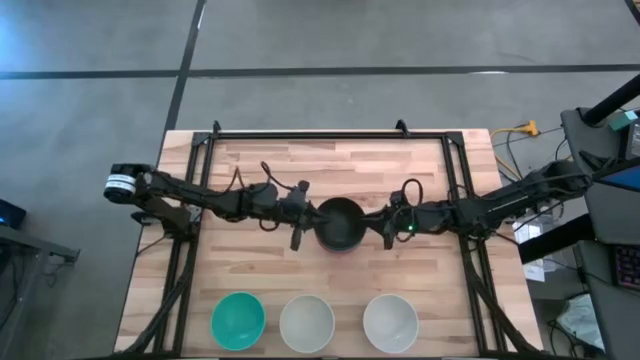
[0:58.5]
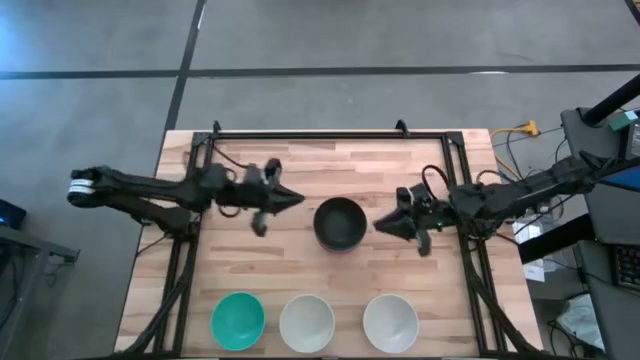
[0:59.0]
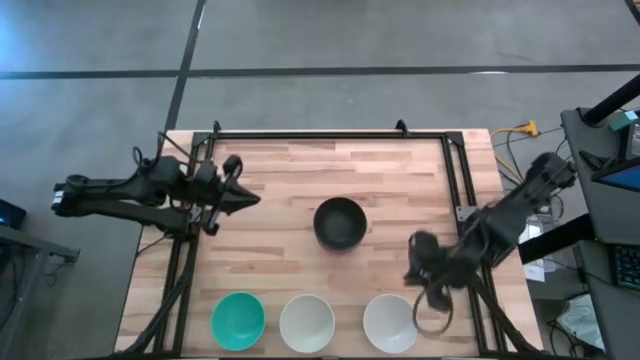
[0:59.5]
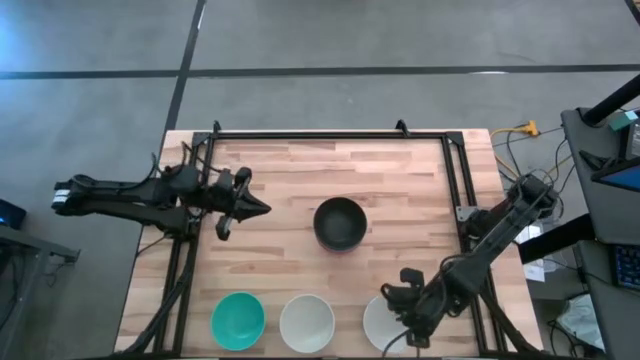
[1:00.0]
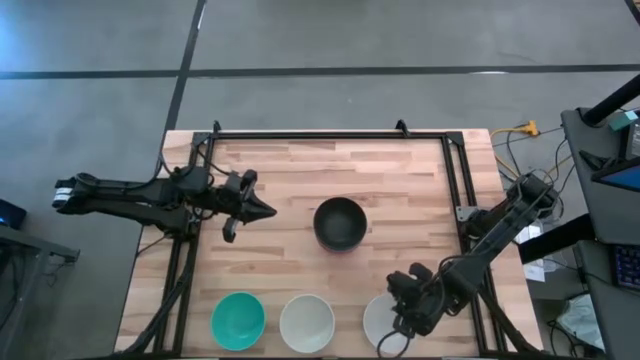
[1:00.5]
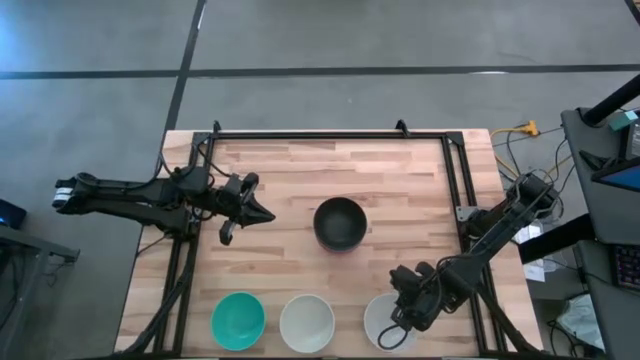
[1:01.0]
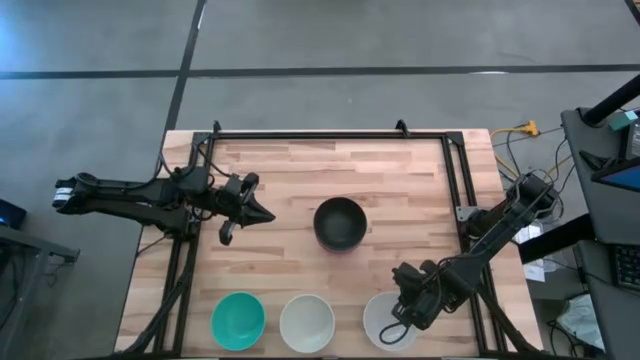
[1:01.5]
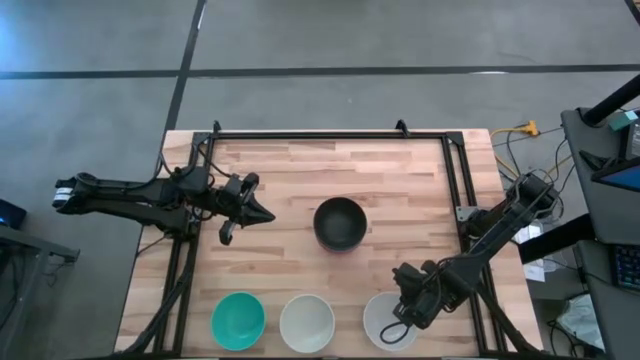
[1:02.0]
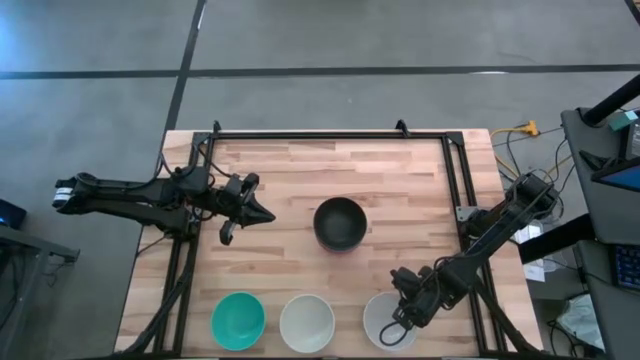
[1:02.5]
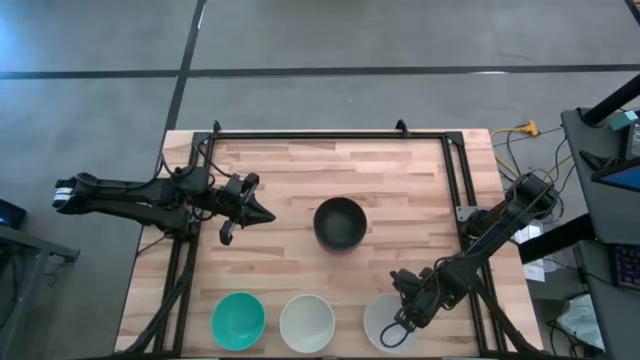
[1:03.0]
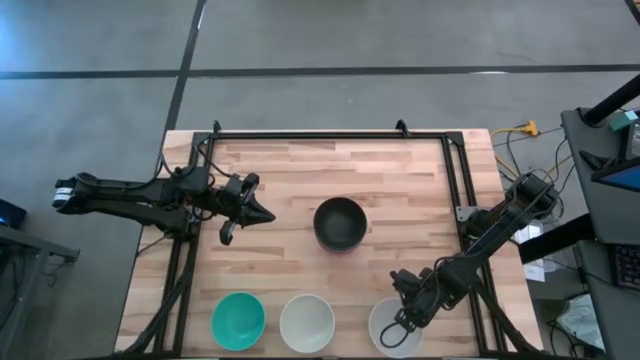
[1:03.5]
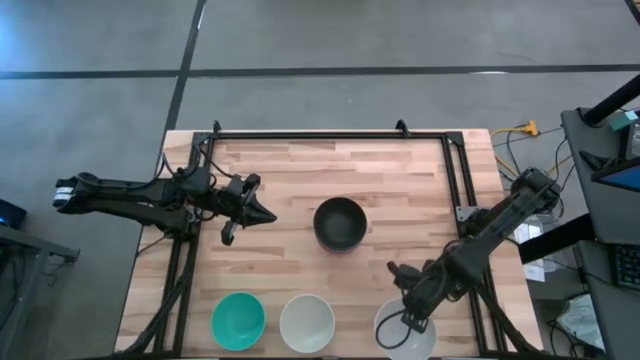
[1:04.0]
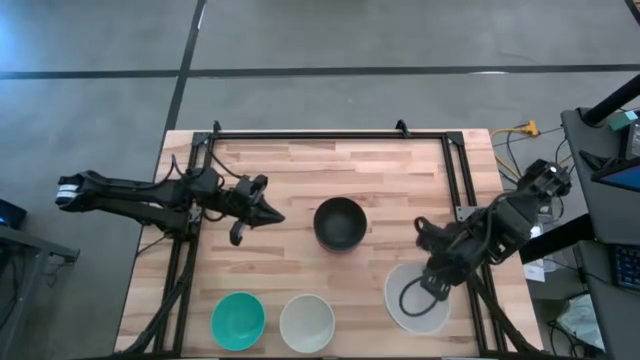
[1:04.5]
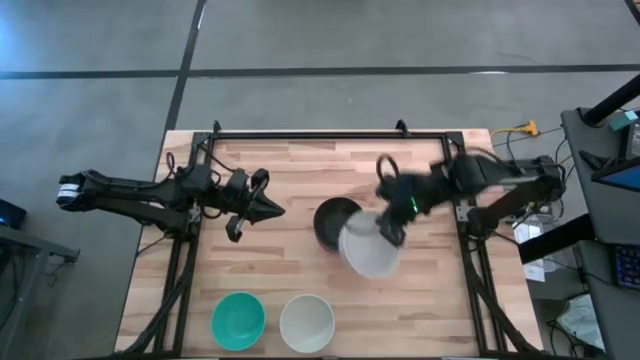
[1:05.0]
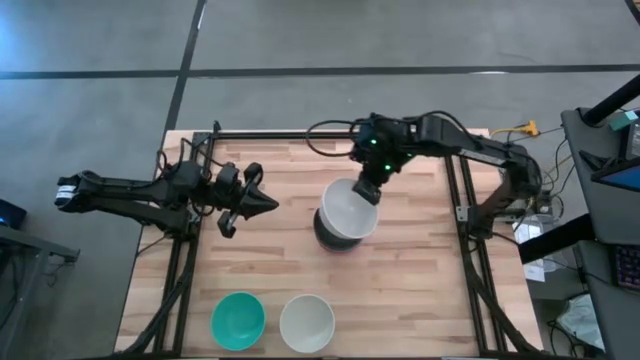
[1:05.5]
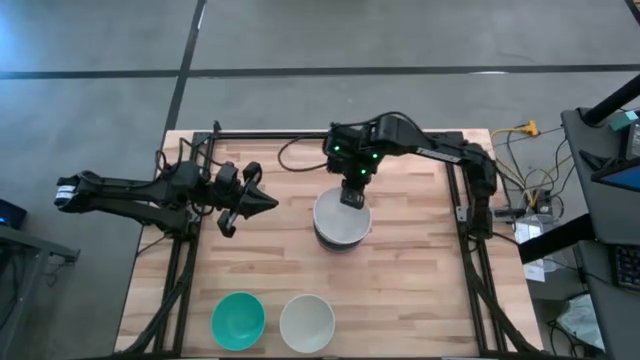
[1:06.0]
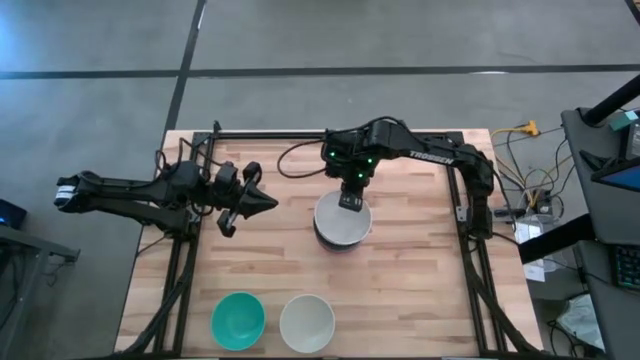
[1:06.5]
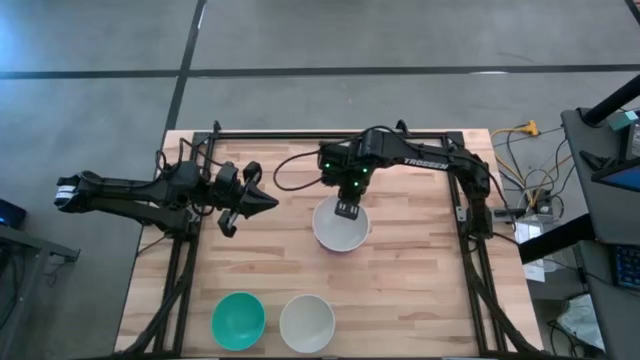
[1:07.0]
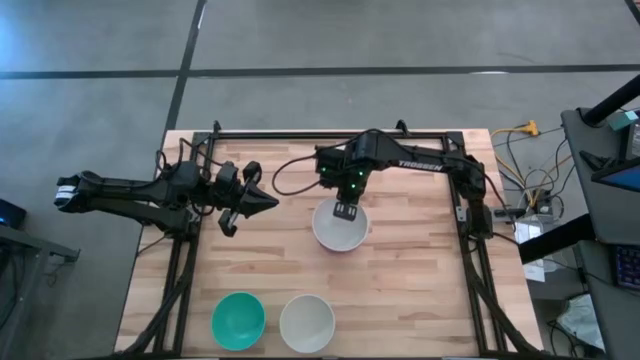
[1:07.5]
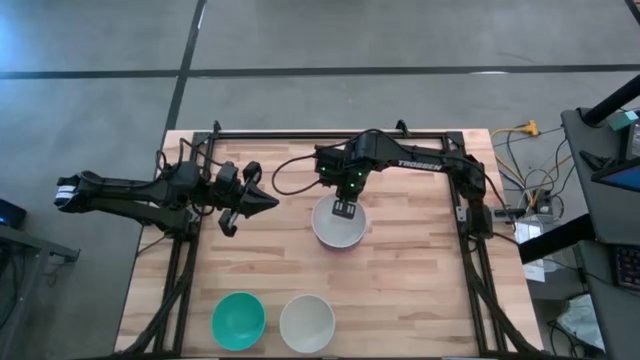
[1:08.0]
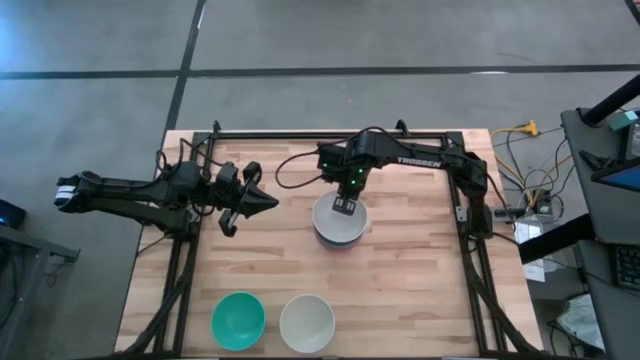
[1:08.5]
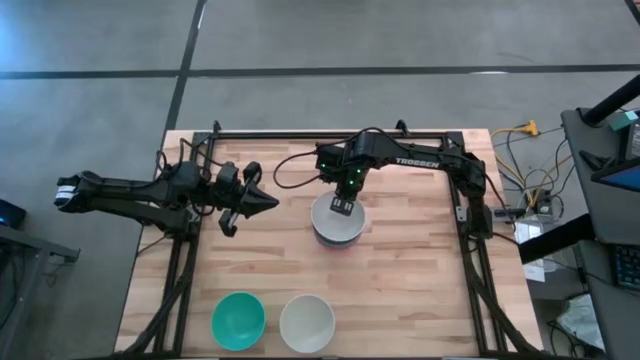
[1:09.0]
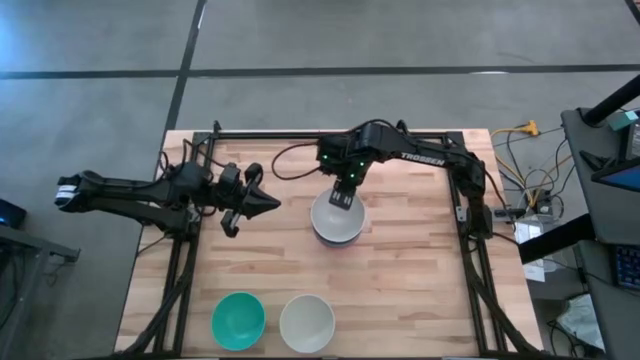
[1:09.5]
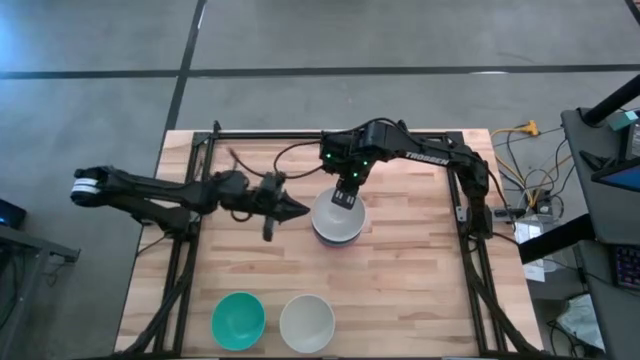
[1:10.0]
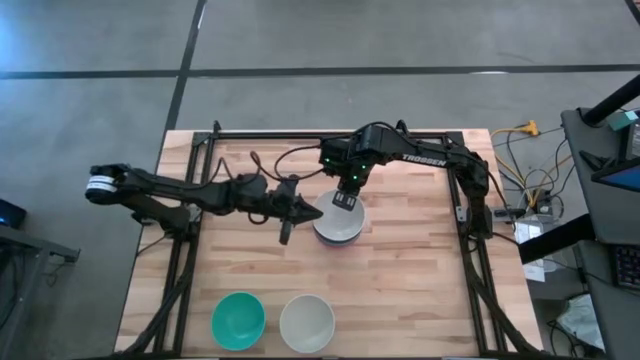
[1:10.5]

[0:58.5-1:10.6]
Task: Nest bowls inside each other
Stack the right white bowl on the black bowl

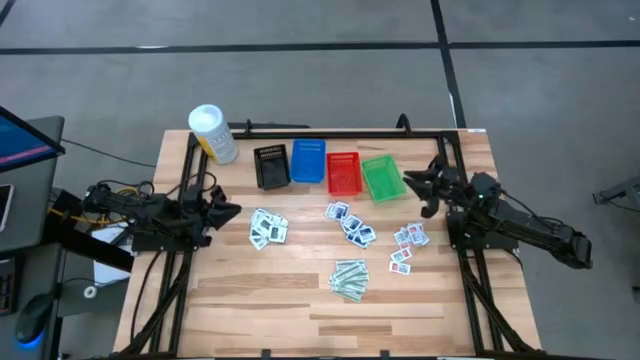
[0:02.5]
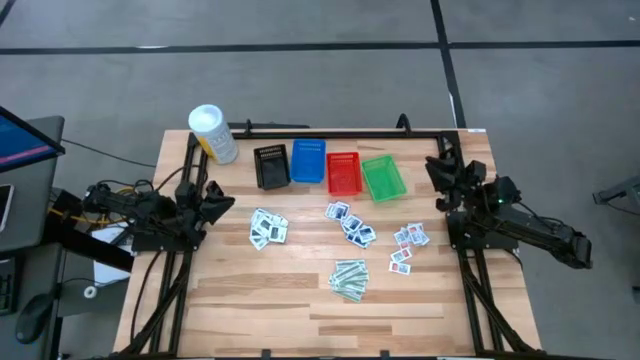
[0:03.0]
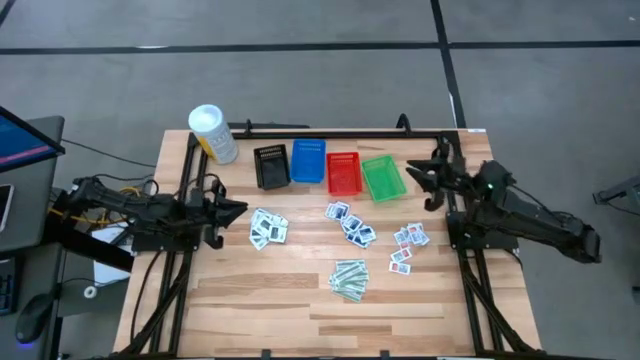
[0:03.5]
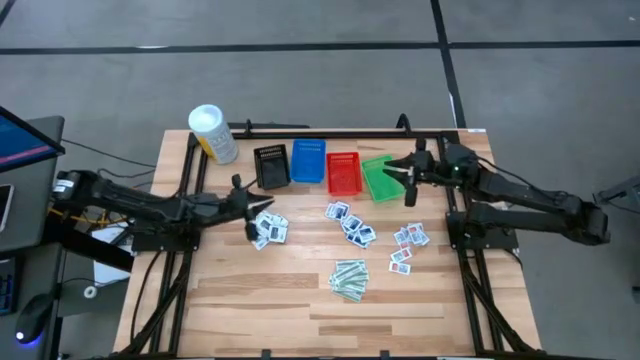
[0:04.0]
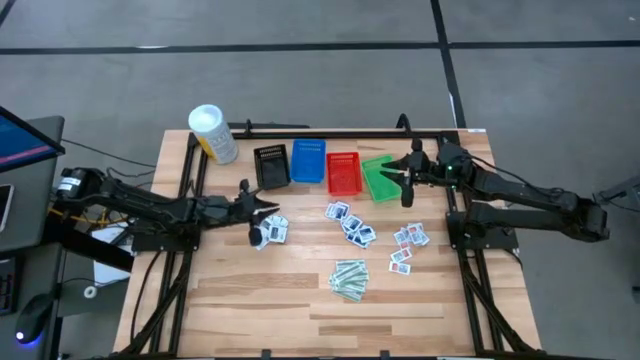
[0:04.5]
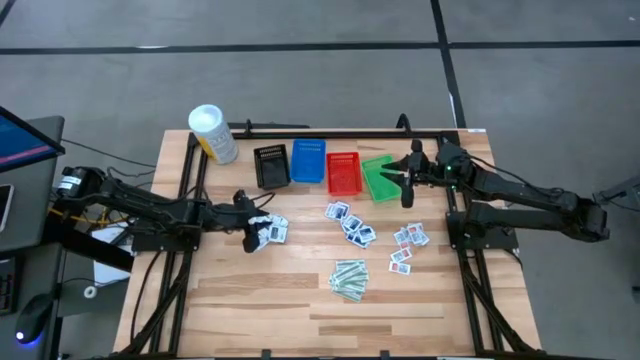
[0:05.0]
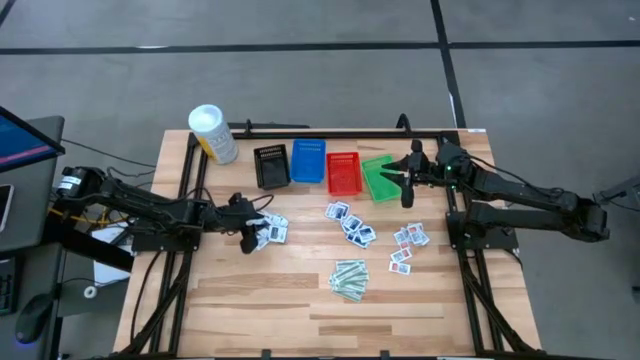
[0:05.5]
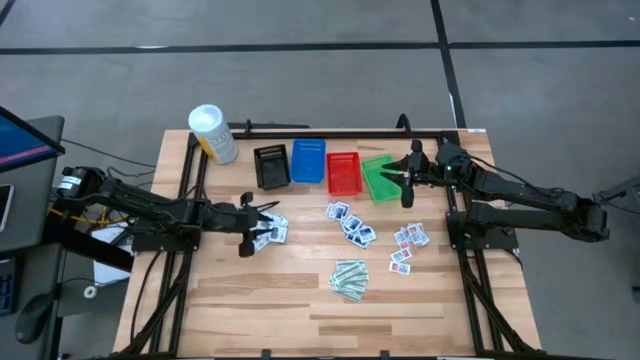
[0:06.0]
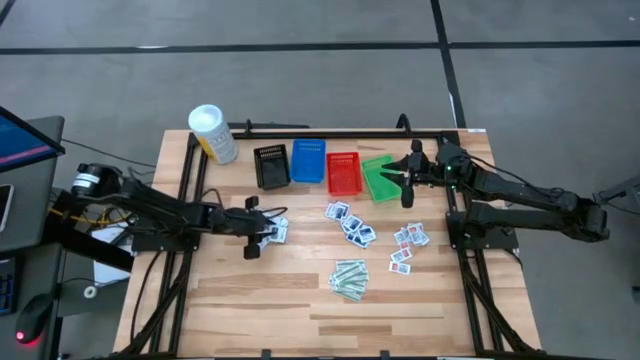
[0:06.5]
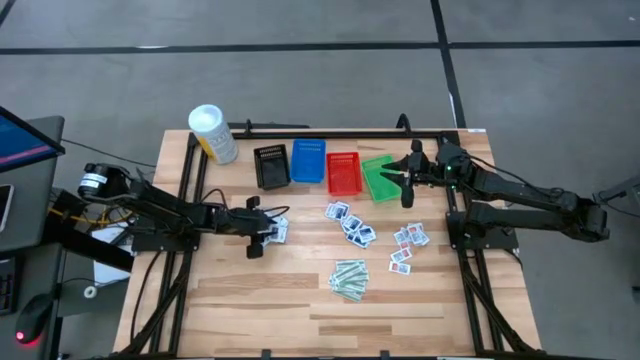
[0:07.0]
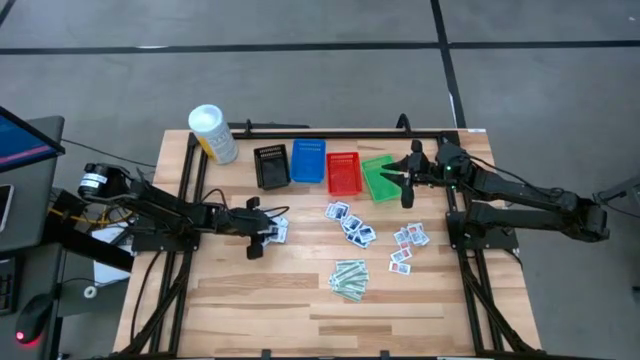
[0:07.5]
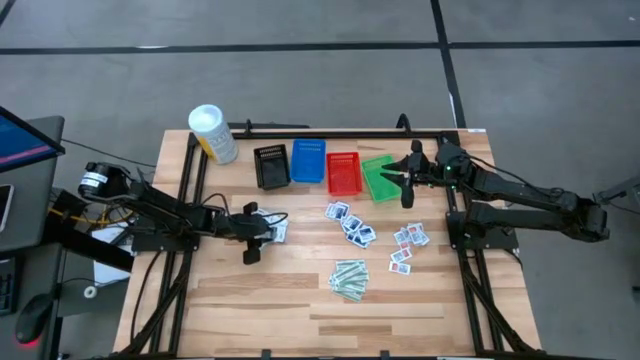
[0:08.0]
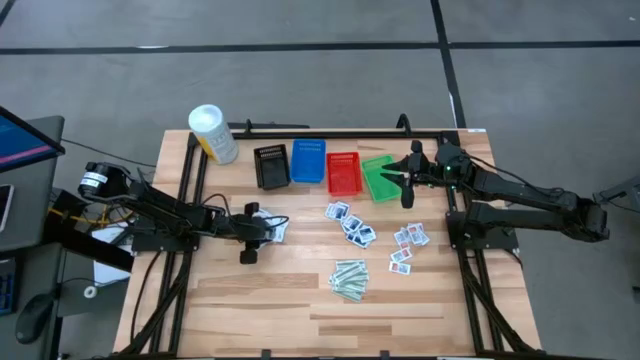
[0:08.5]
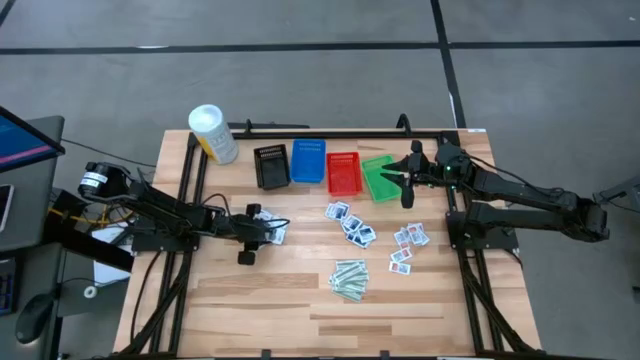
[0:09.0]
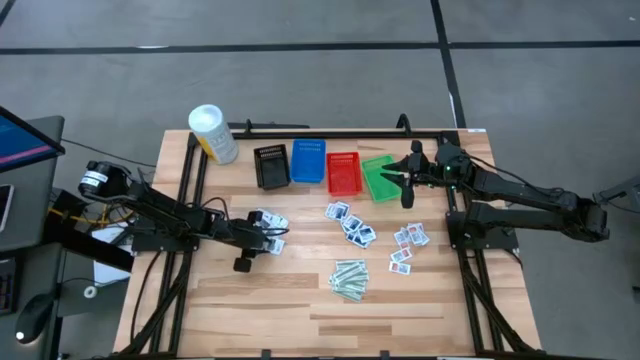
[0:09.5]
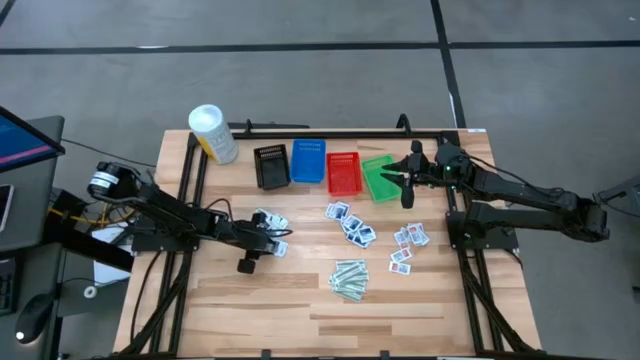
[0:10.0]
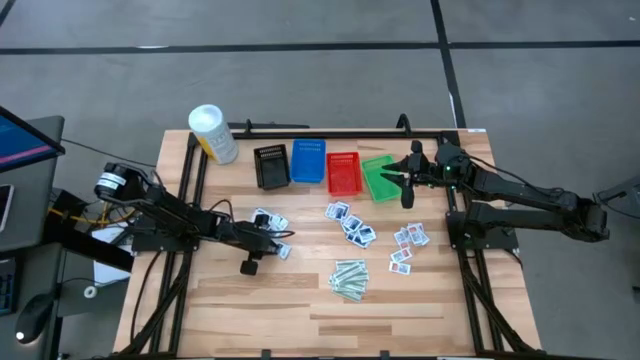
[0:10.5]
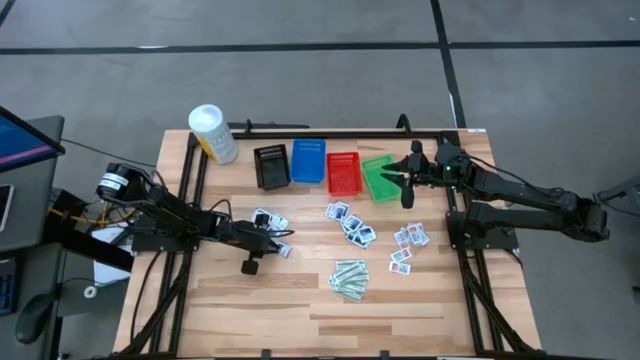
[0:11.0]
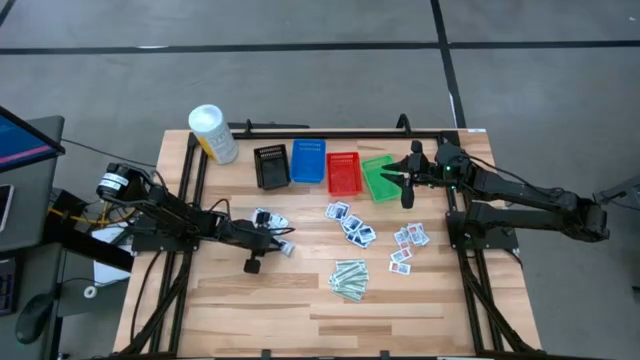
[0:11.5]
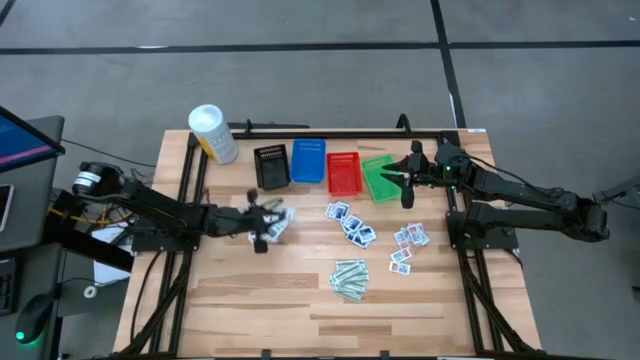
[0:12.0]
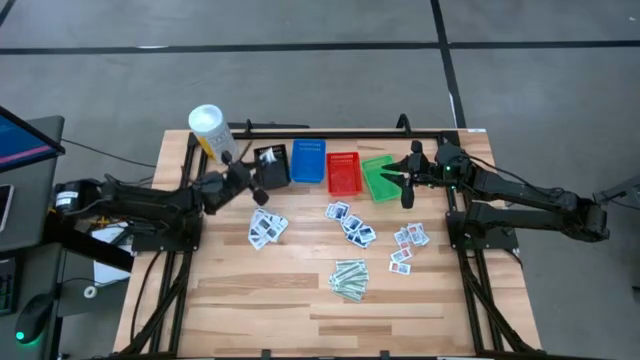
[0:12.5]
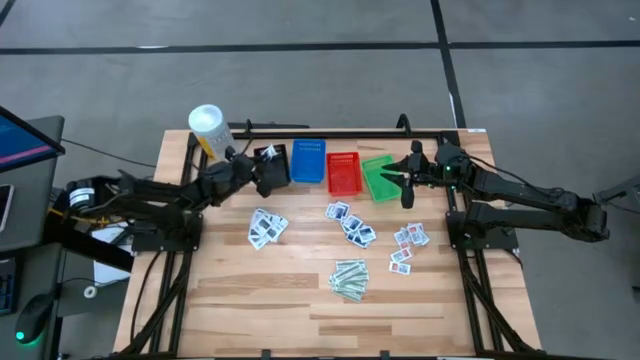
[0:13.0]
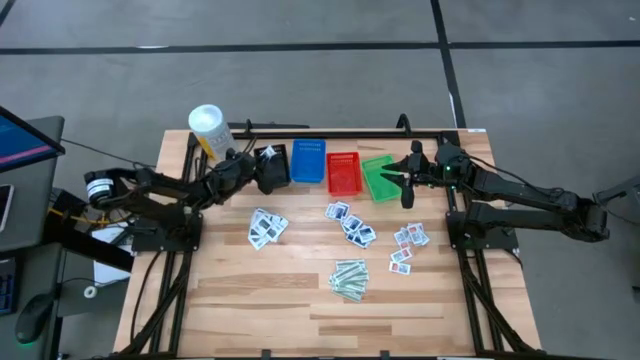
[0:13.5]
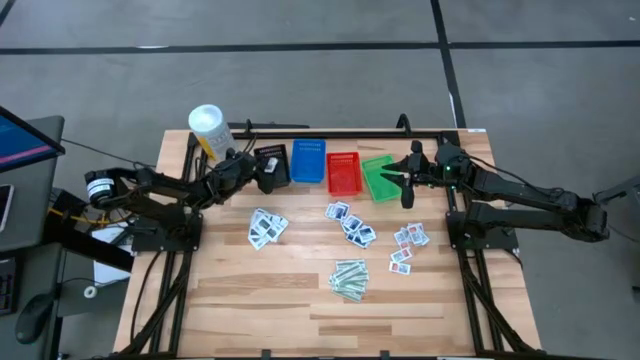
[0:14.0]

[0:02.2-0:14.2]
Task: Pick & Place First Aid Supplies
Put the gray pad into the black bin
